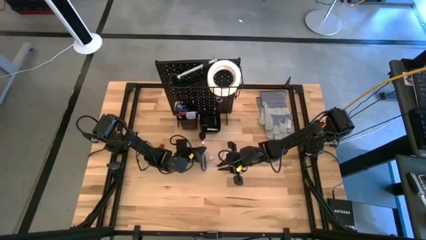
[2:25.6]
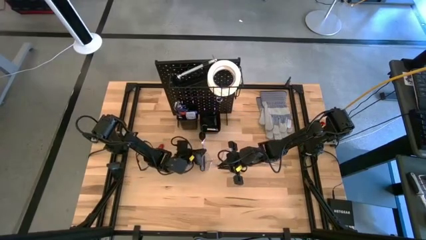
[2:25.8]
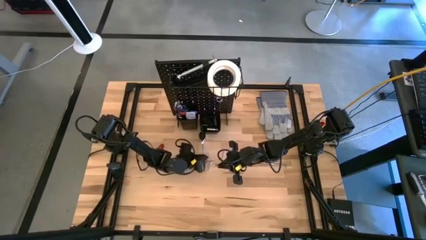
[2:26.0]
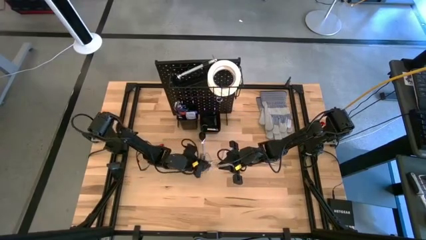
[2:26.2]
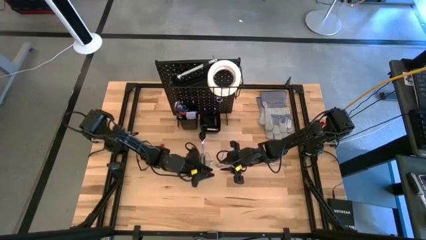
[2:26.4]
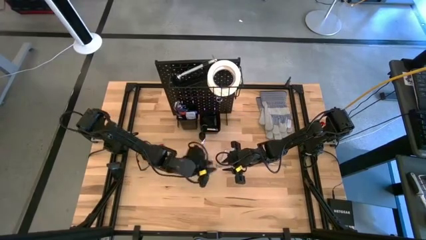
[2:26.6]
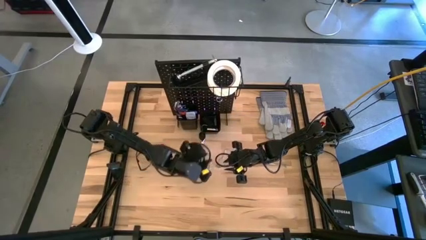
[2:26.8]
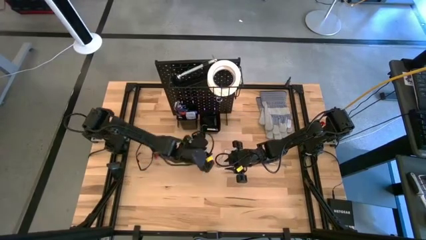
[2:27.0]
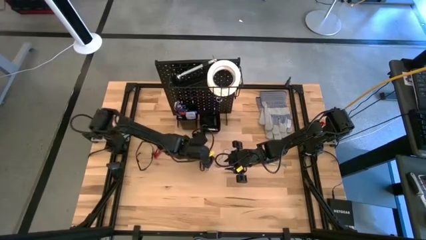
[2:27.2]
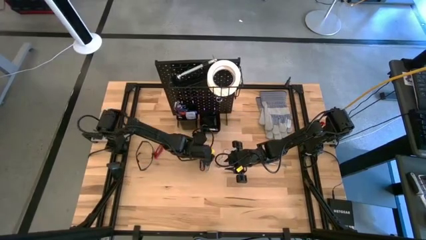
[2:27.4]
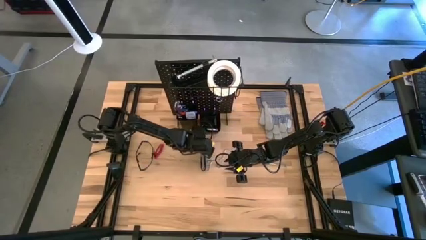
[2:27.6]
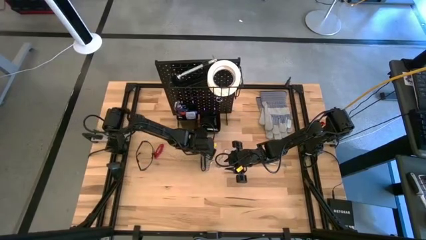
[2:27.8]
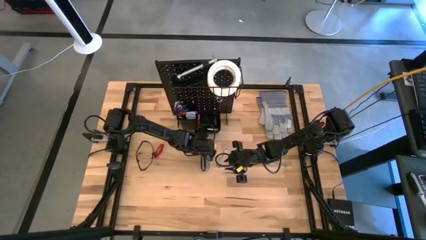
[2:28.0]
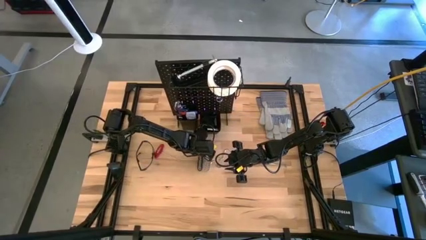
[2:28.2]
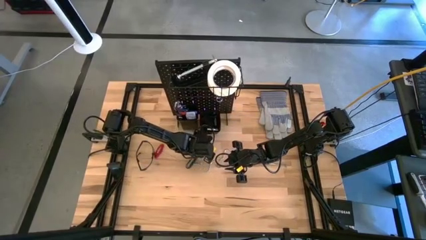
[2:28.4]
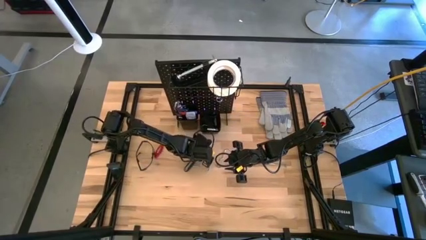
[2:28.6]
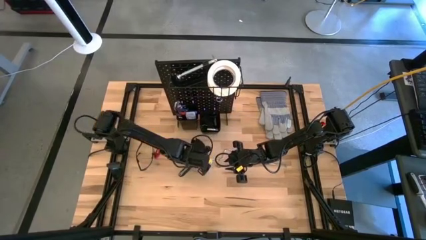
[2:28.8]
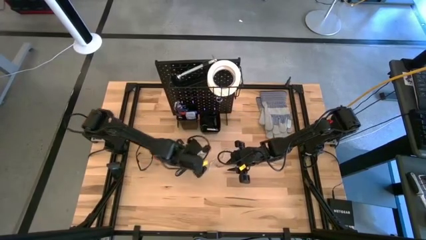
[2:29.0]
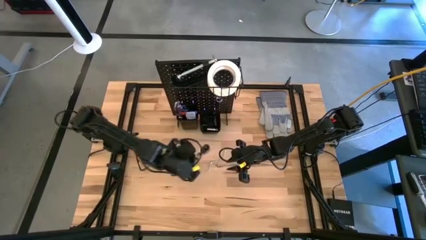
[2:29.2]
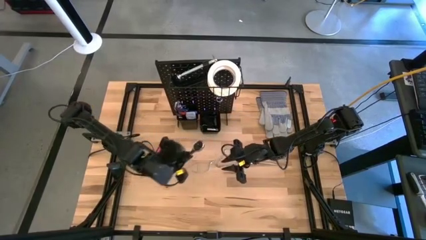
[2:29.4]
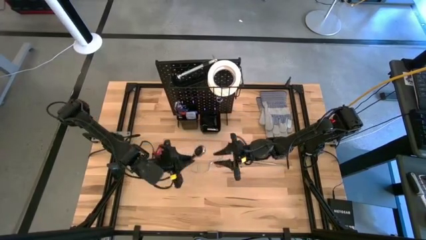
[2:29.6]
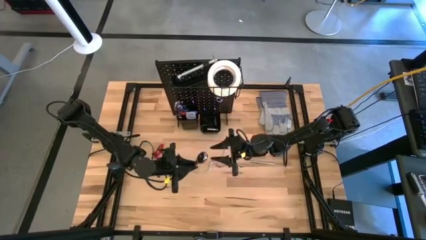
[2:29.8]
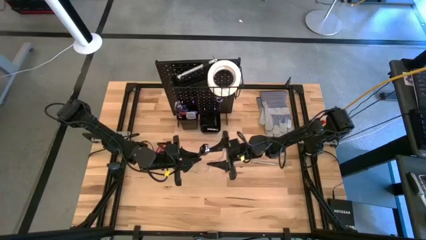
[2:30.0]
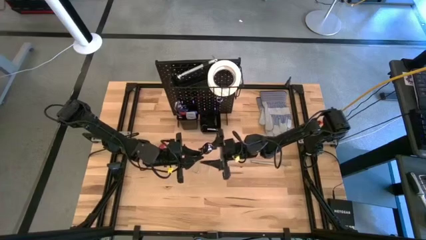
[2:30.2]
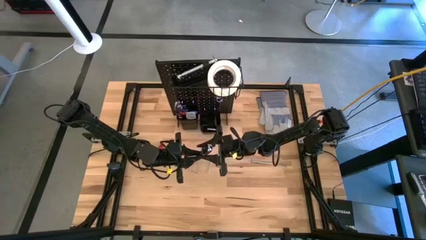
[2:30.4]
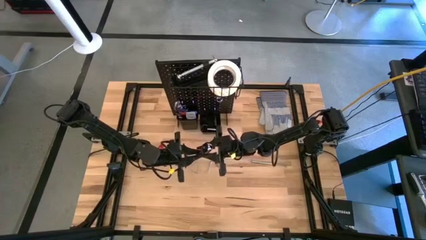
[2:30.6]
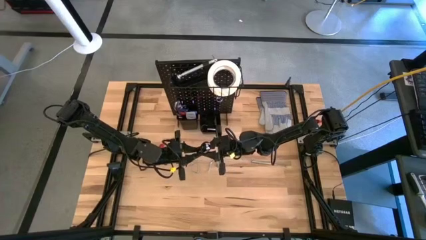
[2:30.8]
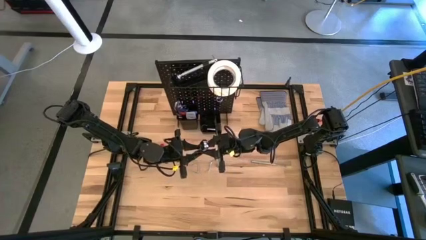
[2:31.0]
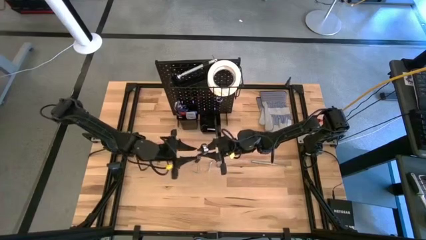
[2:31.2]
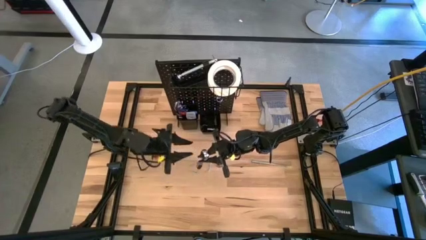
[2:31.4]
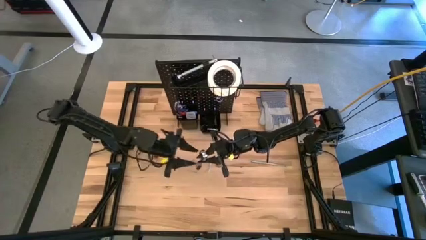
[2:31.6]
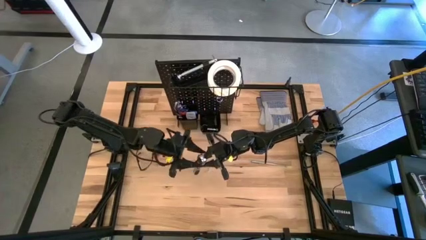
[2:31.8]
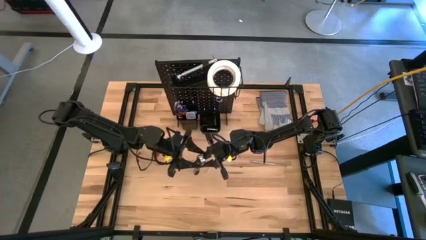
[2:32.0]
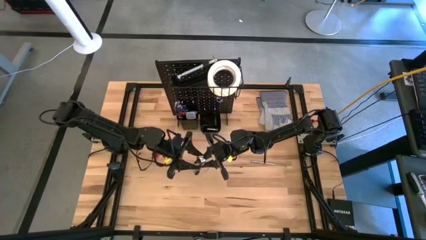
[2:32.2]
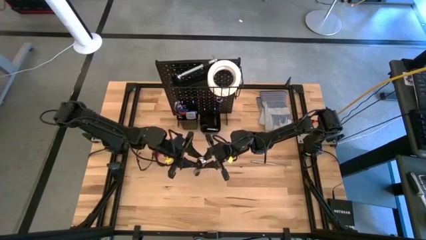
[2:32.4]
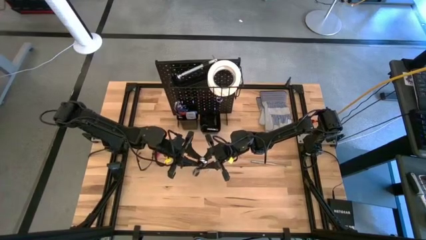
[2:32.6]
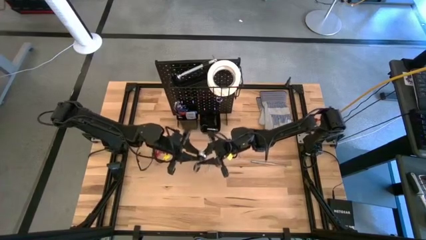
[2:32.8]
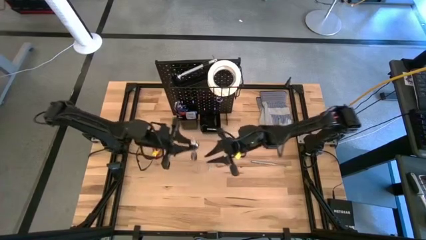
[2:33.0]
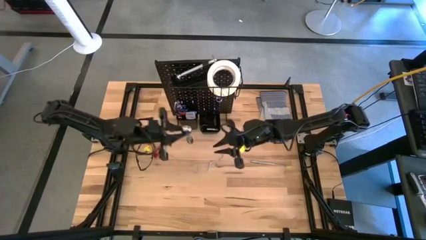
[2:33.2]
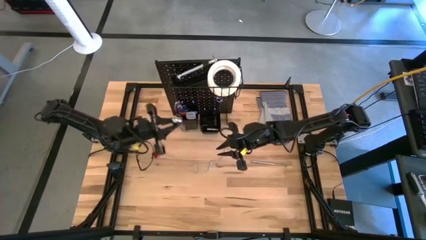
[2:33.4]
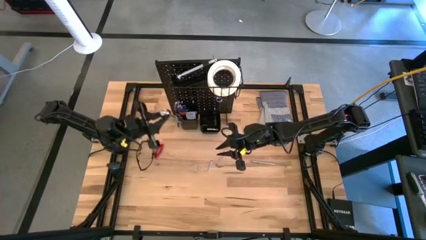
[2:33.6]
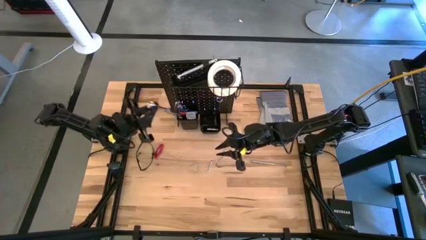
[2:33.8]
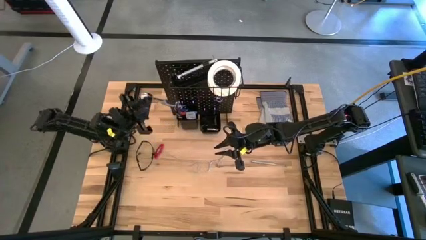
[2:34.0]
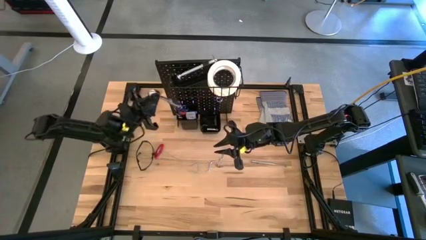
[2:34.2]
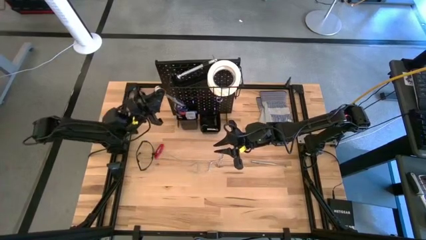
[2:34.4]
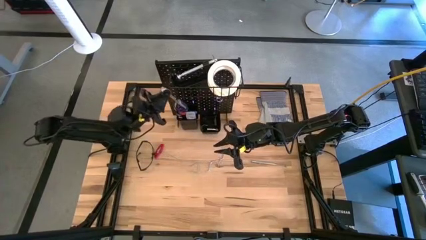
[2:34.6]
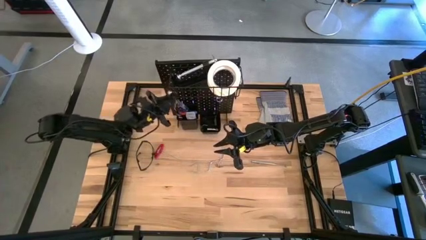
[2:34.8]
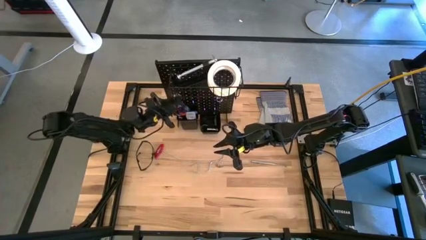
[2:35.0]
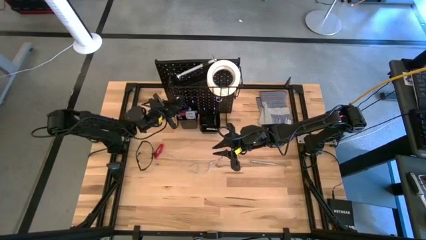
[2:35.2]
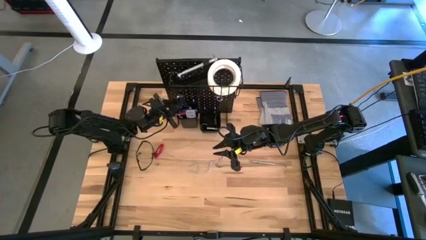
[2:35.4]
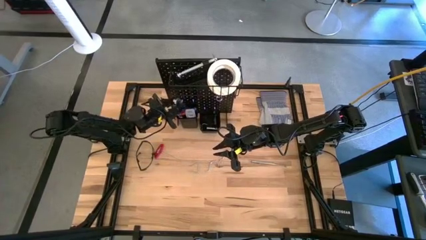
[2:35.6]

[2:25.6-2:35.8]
Task: Hang tools onto peg board
Put the ratchet wrench into the left bin on the pegboard

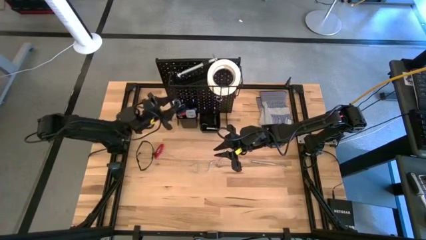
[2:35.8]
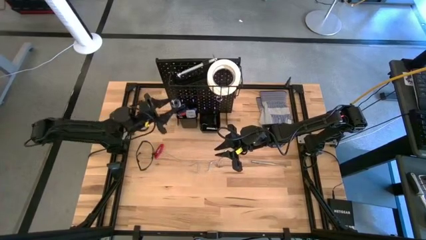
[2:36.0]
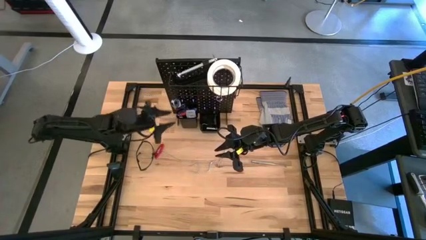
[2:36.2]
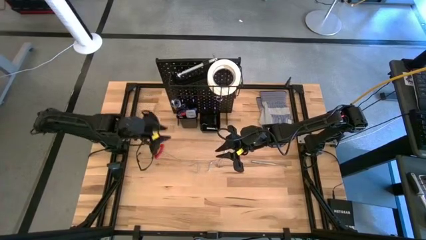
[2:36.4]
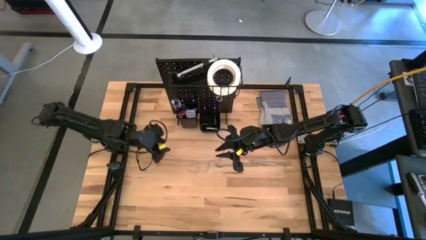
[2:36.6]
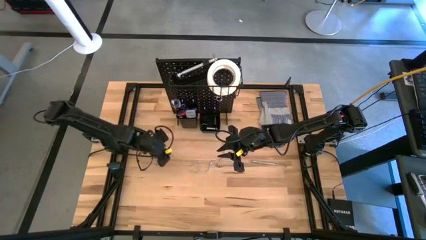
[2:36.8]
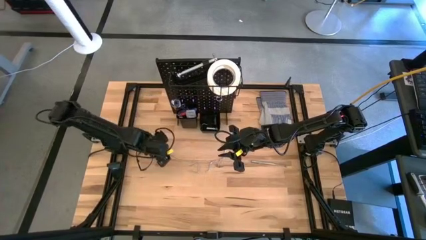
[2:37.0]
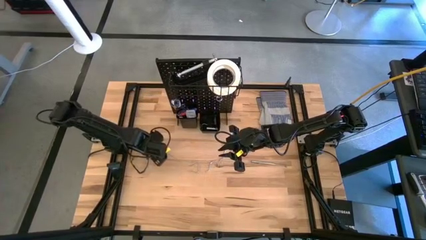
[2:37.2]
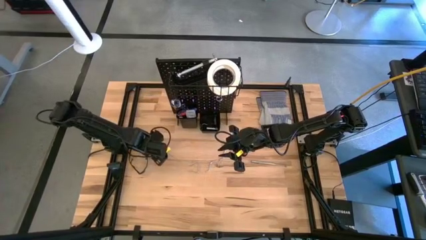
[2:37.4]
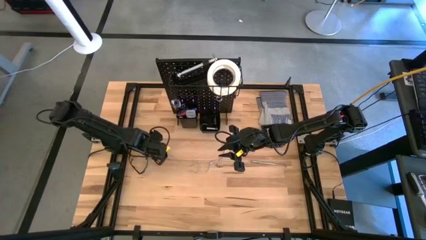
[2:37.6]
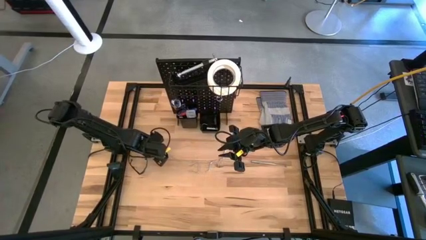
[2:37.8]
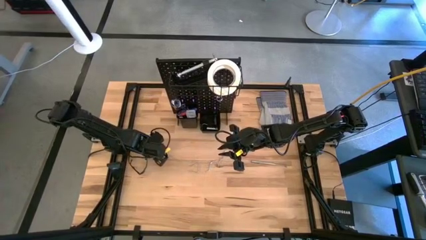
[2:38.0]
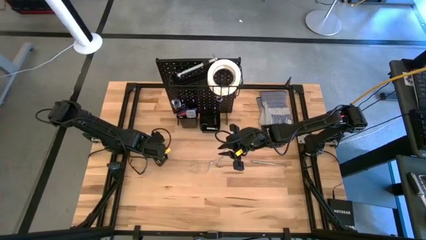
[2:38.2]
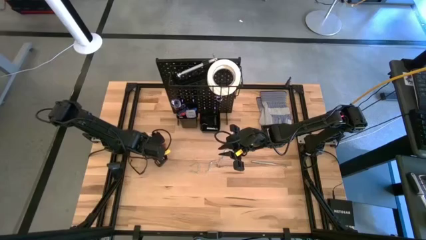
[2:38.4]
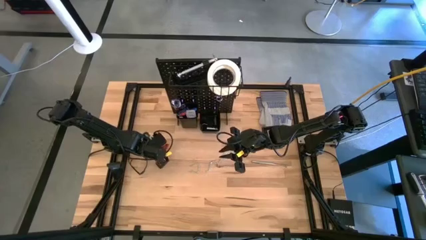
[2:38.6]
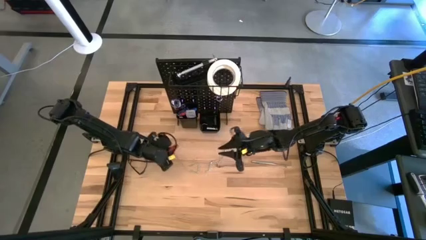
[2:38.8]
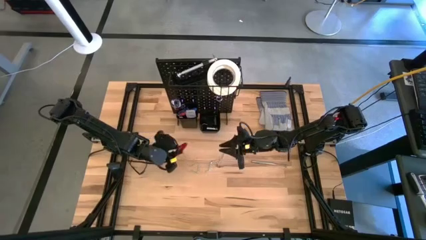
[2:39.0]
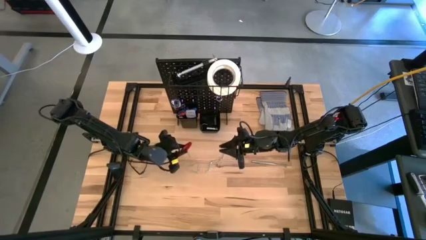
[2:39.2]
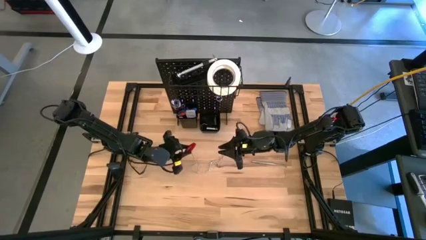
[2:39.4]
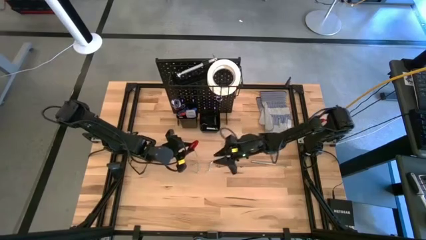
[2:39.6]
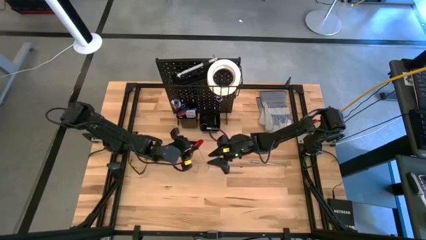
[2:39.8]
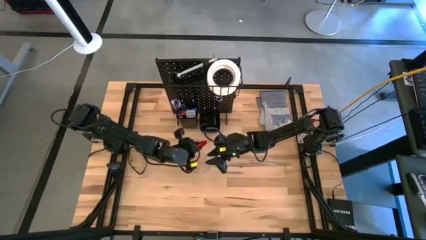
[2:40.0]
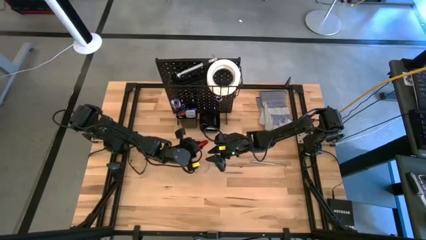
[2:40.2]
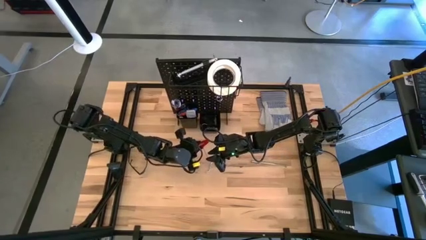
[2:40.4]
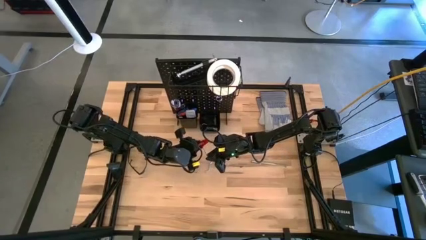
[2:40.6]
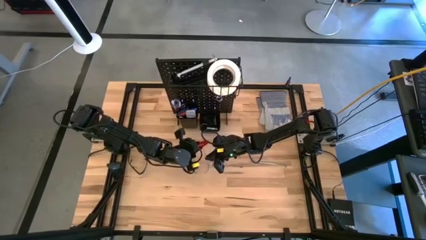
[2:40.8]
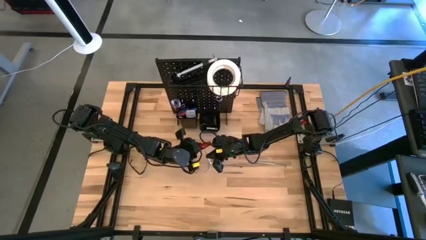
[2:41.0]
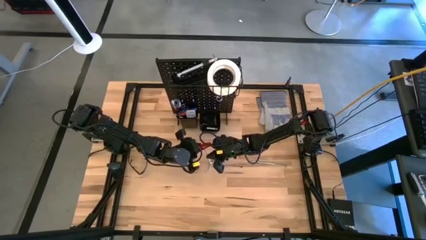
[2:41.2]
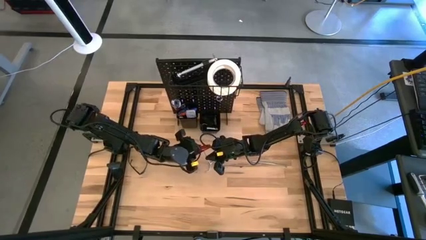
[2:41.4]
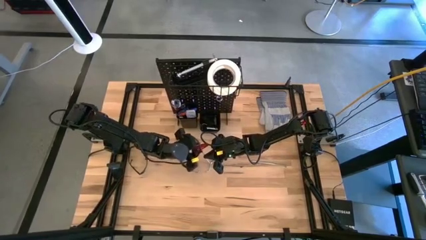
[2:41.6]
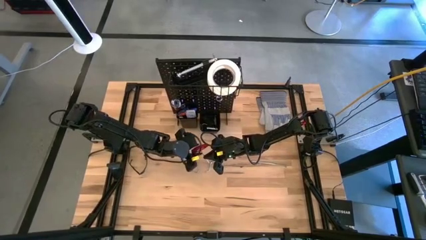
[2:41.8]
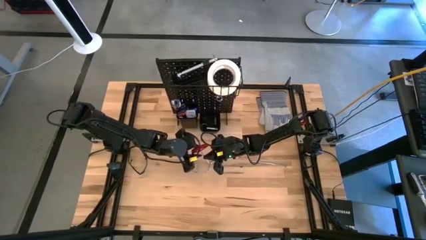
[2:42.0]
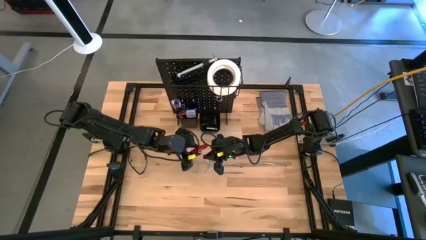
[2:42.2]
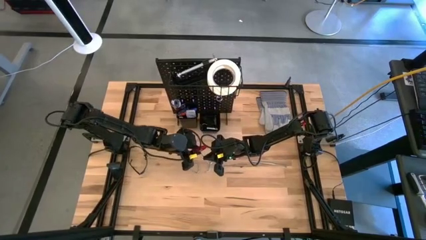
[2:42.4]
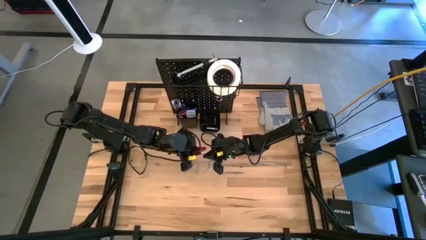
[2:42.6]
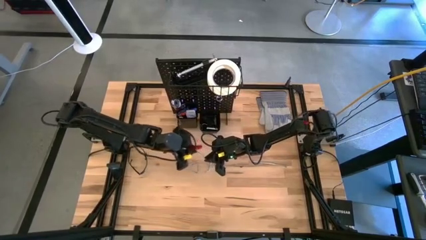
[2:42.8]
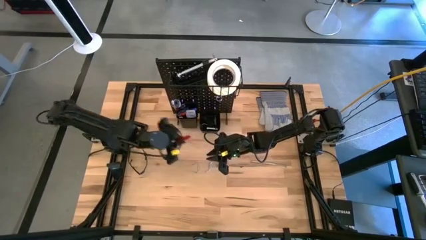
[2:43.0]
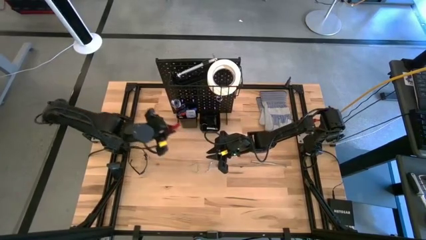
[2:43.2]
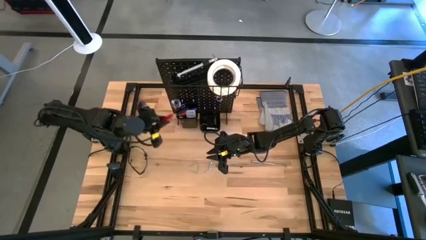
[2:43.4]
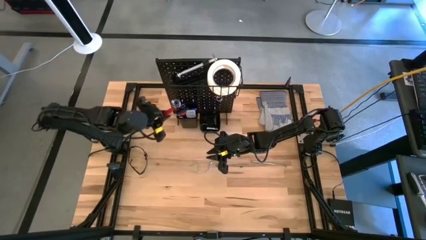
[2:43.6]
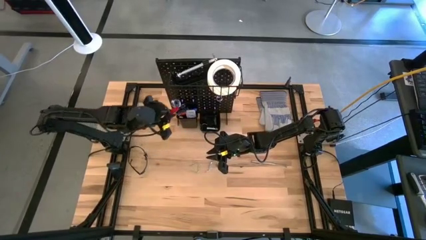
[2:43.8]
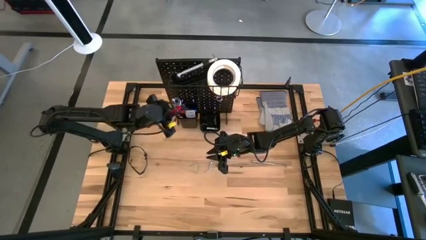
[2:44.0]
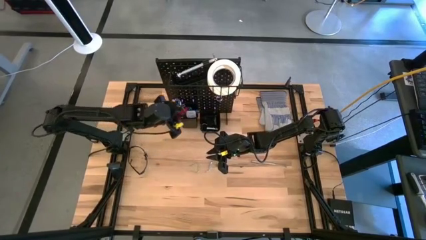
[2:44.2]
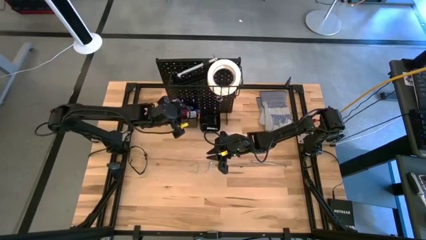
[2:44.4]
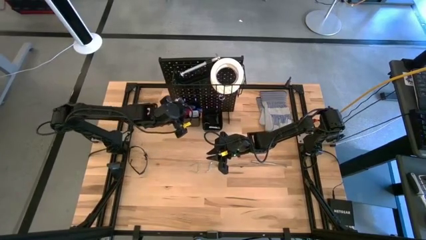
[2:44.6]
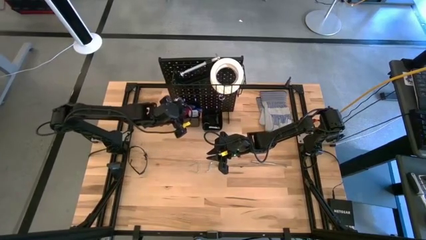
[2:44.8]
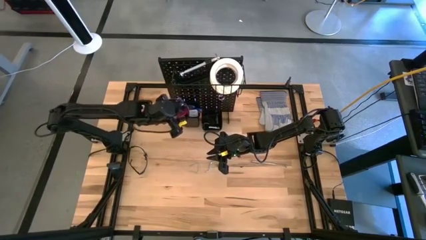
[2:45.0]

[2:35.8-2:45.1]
Put the red allen wrench into the left bin on the pegboard
